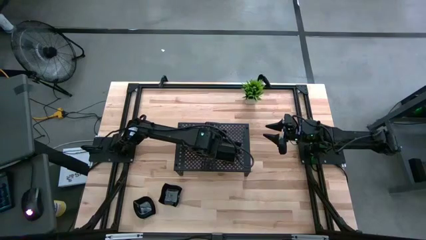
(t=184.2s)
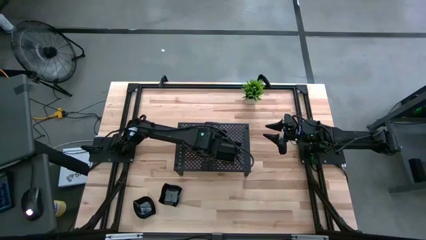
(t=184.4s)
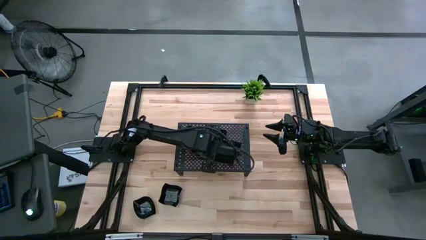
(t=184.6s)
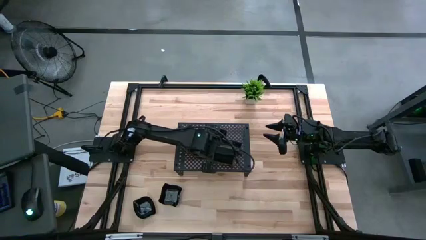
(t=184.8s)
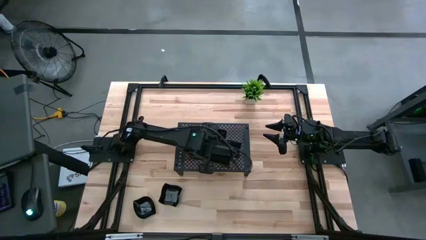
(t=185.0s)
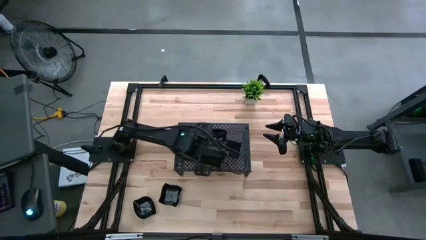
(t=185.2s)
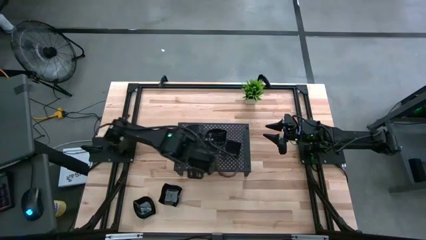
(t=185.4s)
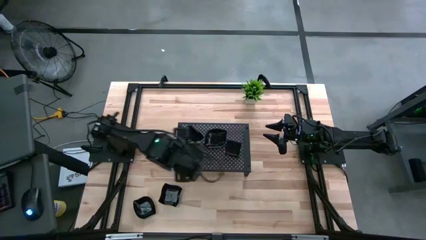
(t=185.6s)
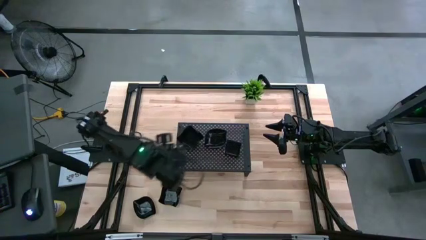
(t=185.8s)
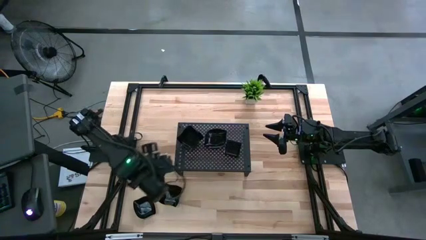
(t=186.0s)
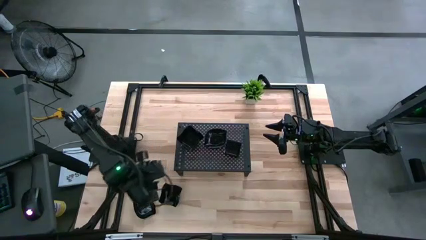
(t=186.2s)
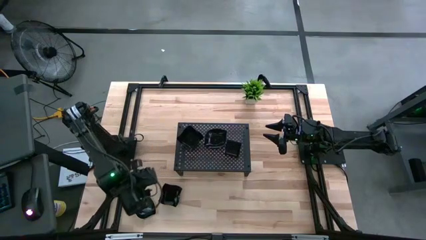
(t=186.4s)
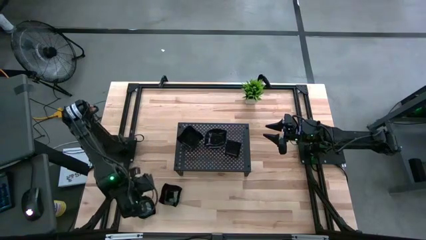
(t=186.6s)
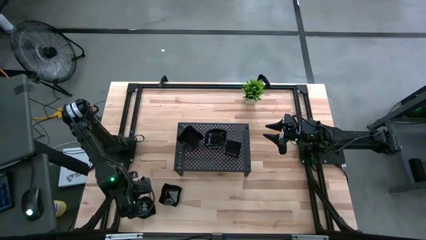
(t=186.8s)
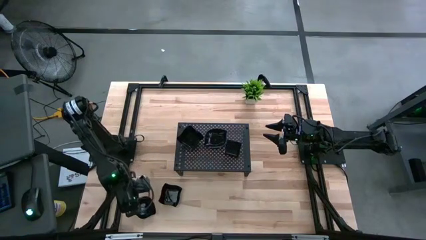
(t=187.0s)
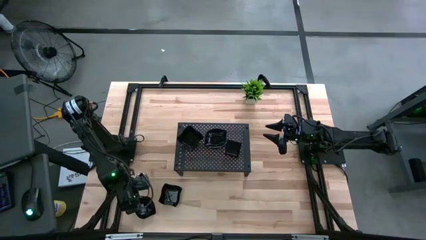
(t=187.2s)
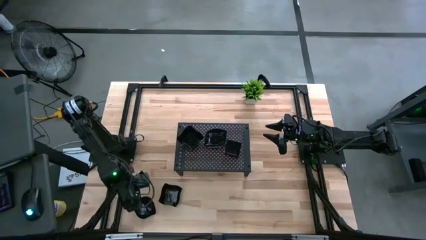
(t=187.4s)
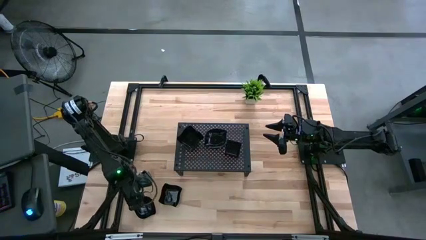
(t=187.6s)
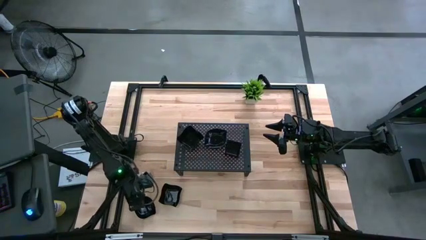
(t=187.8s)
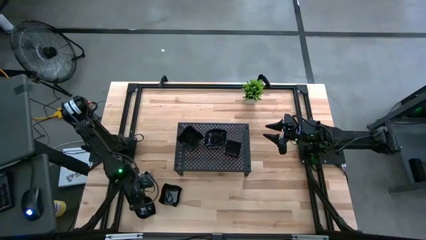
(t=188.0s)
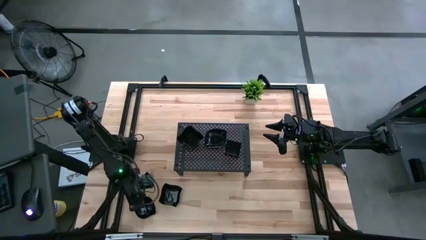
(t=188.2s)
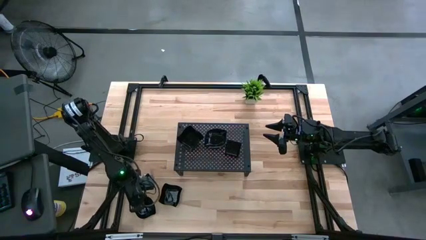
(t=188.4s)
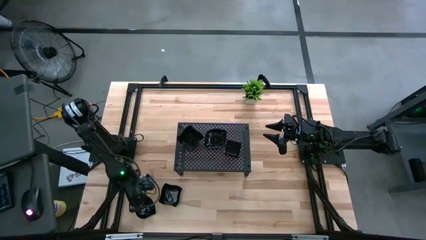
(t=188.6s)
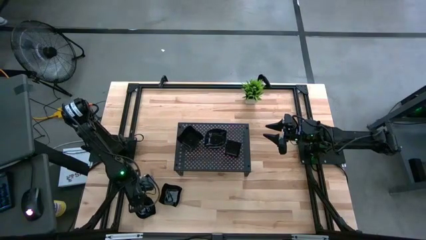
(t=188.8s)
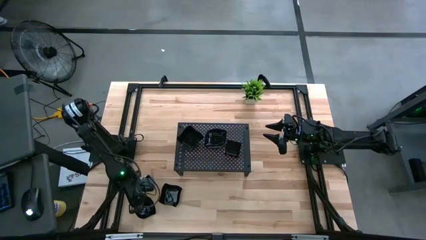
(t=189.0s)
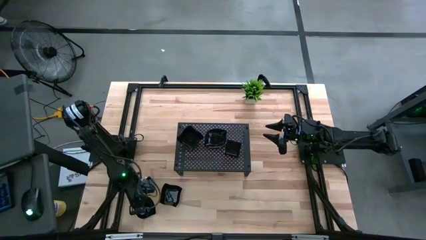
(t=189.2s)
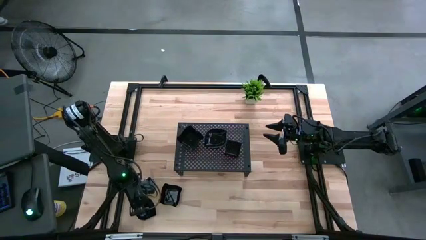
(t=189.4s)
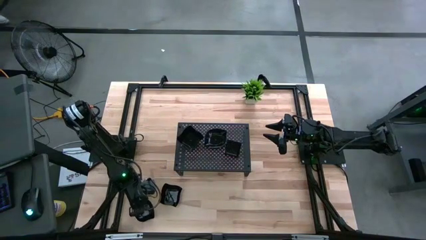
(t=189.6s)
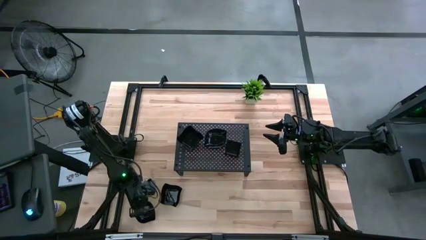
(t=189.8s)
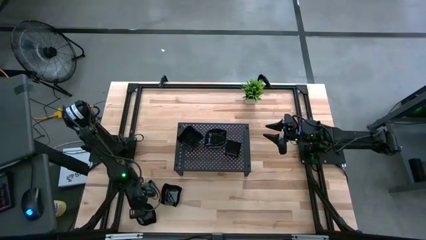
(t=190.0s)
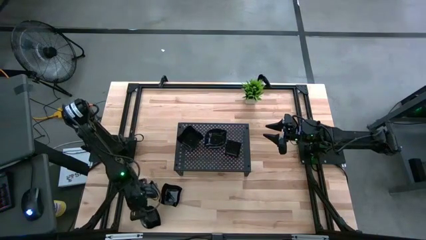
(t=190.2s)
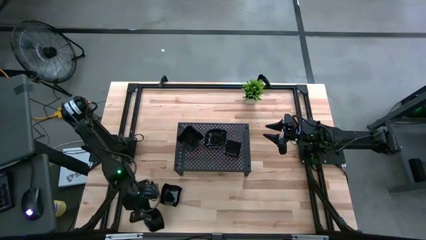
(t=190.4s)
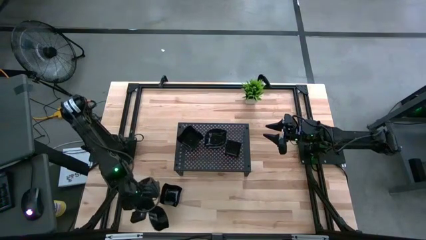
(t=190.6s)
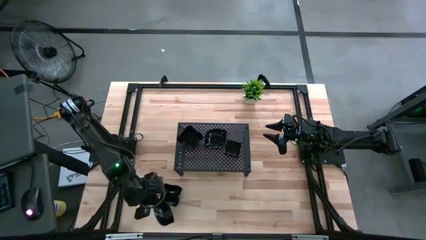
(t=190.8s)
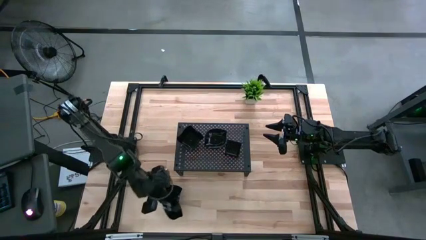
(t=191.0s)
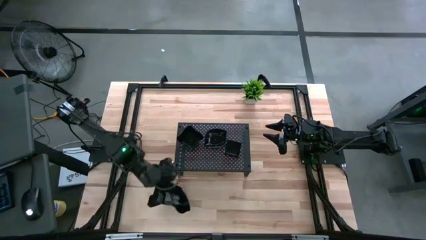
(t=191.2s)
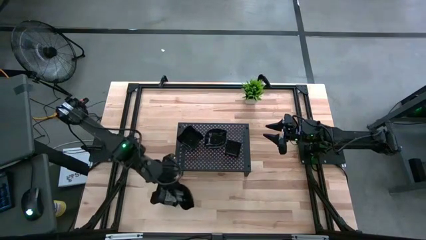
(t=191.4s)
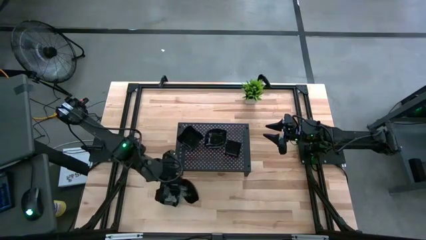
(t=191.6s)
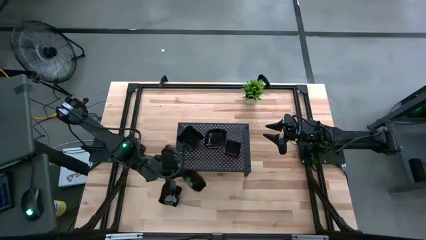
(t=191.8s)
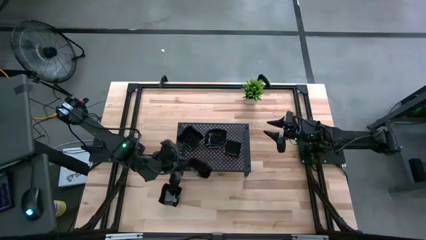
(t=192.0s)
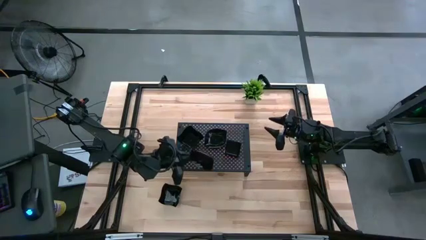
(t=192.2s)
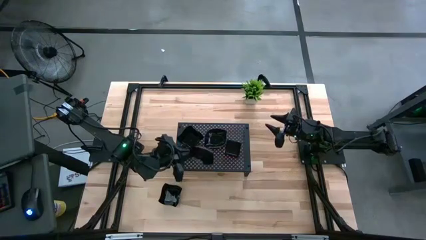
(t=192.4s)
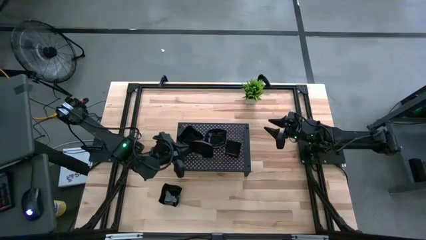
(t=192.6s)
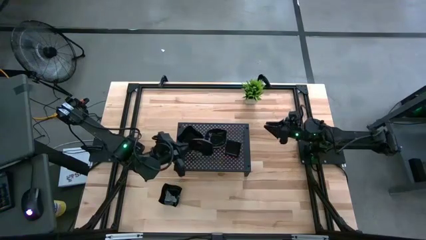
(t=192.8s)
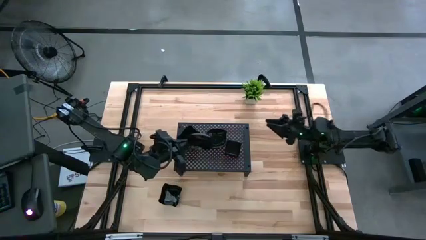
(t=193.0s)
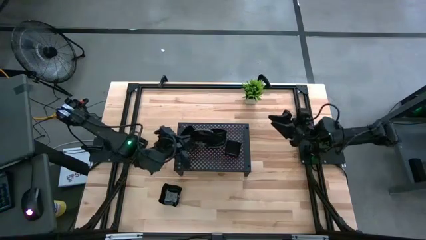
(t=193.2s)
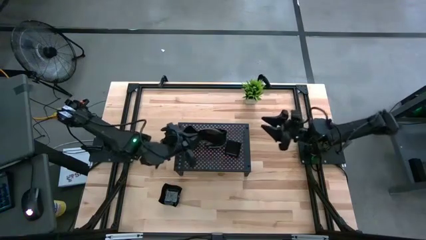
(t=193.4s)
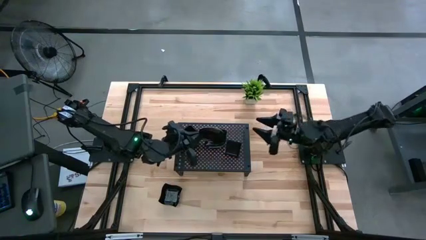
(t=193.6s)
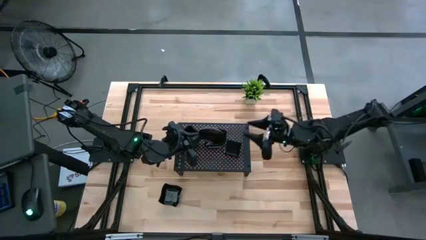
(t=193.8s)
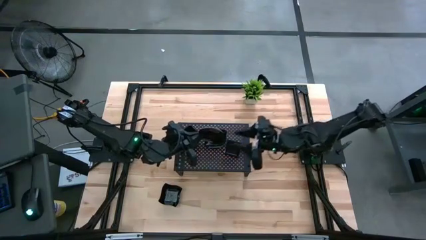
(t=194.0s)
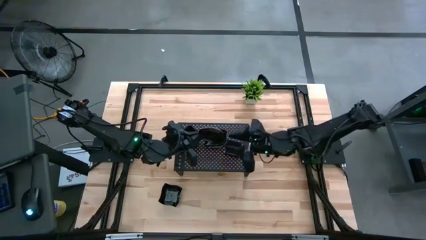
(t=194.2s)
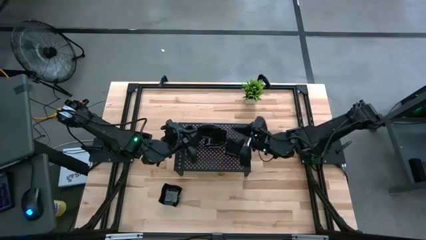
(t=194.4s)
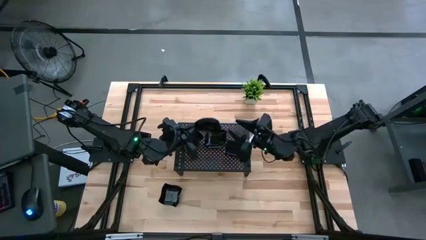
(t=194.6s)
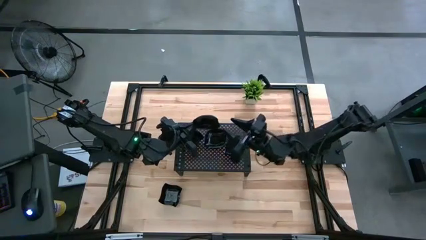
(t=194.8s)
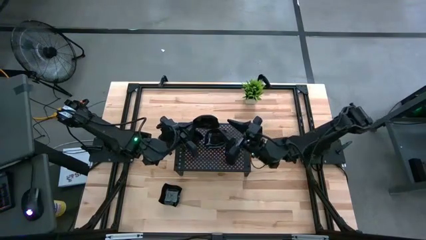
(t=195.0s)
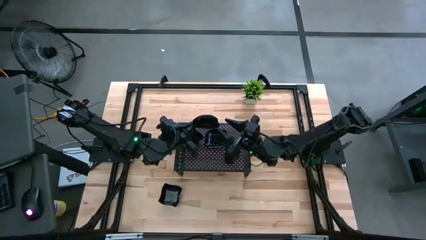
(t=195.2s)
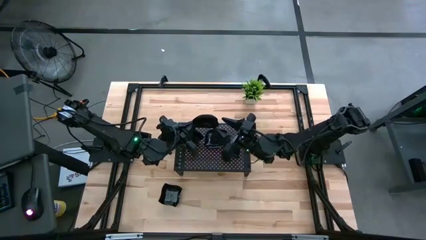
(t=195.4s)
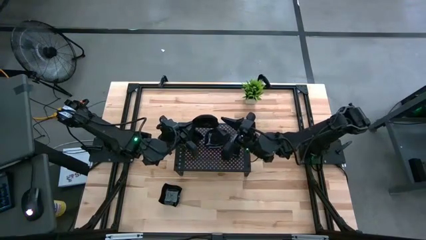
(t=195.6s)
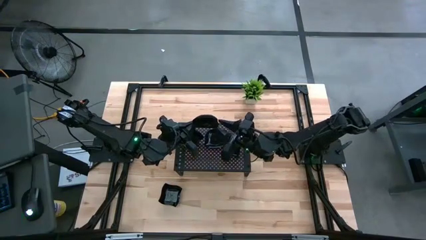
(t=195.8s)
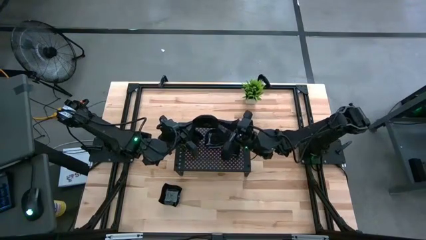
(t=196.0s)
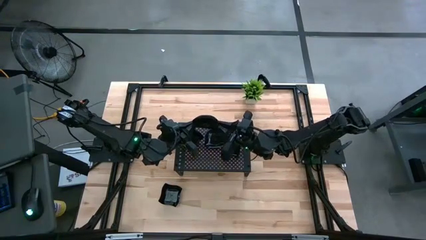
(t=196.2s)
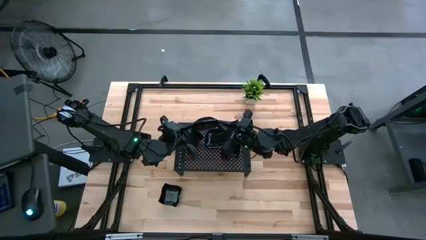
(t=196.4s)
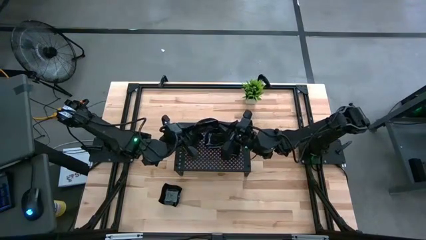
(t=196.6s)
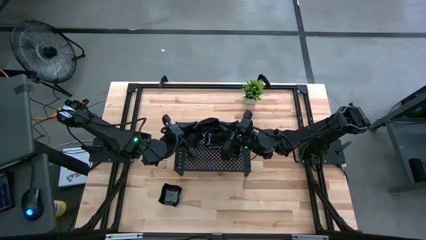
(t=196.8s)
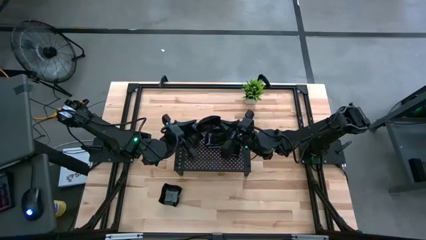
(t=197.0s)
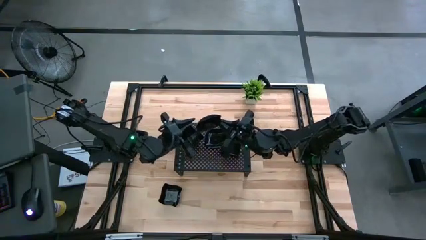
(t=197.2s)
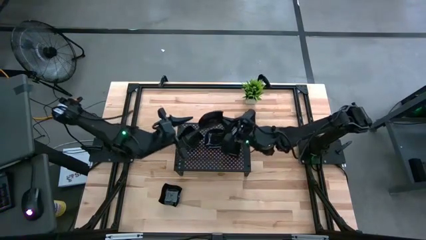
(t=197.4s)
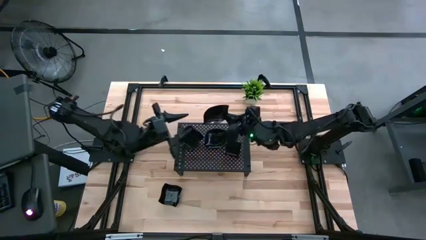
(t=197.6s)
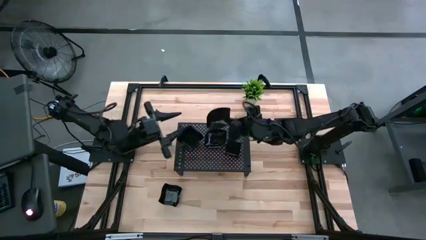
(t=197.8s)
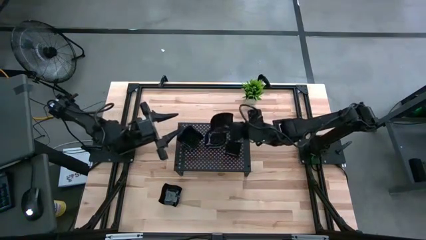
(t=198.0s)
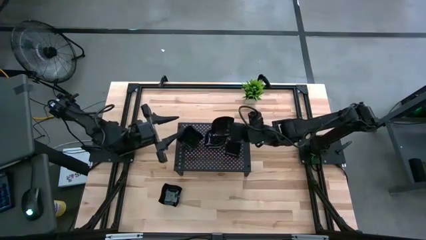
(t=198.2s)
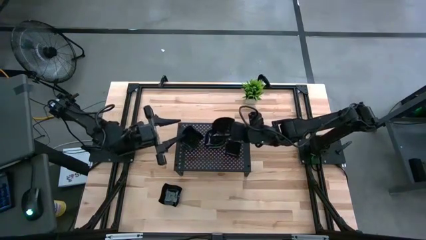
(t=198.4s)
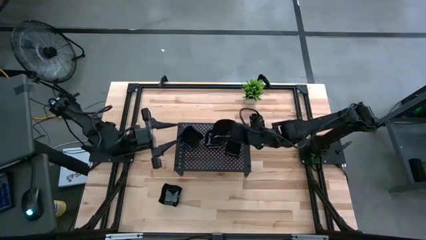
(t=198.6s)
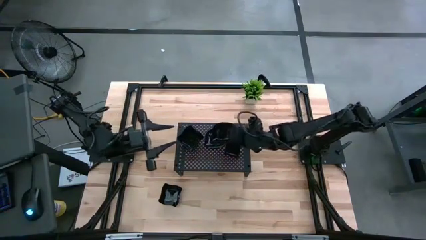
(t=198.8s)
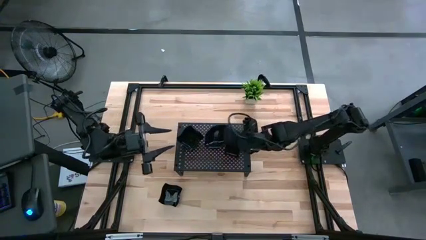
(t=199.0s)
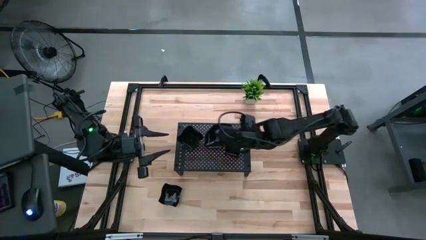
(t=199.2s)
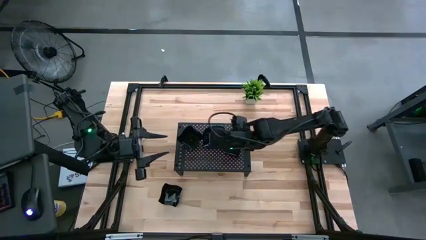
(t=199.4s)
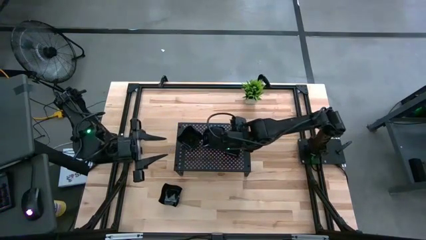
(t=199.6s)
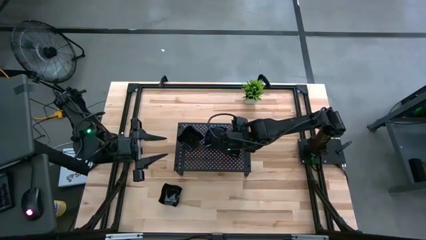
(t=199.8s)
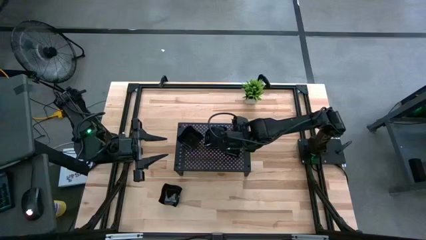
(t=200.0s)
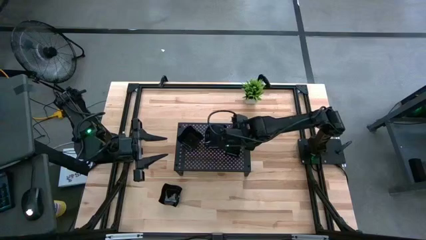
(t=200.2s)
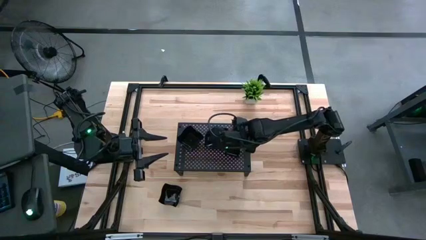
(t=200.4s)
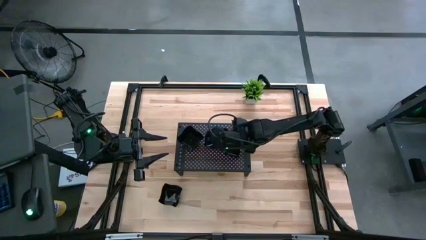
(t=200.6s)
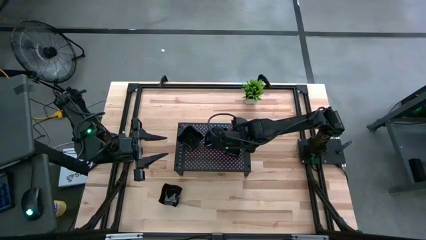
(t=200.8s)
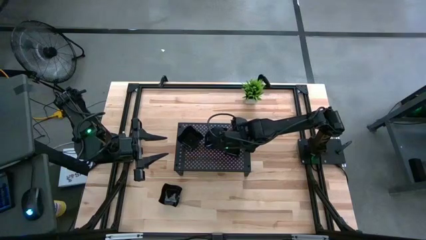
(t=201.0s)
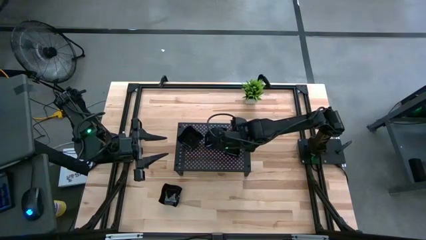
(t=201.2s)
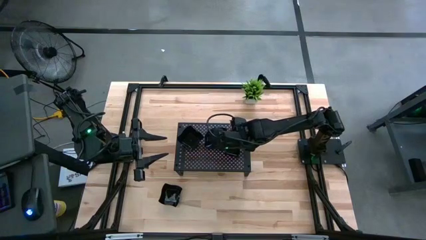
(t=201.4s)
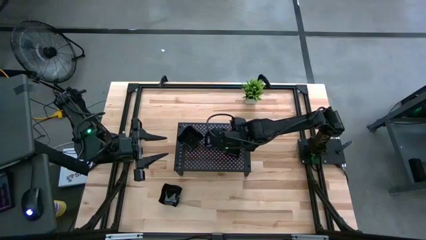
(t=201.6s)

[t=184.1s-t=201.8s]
Task: Pick & Place Mini shaped plates
Stack the leaf shaped plate on top of the leaf shaped plates on the shelf
